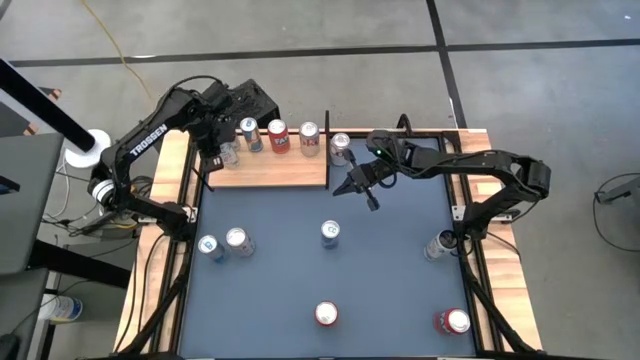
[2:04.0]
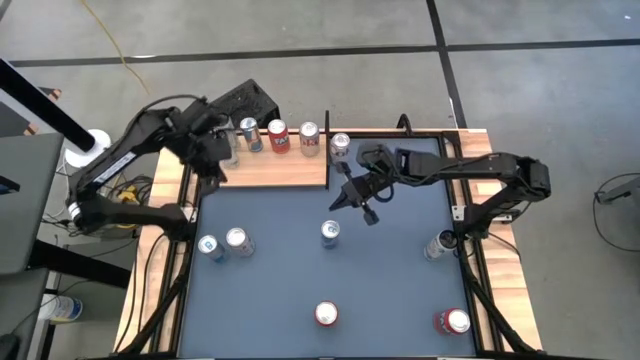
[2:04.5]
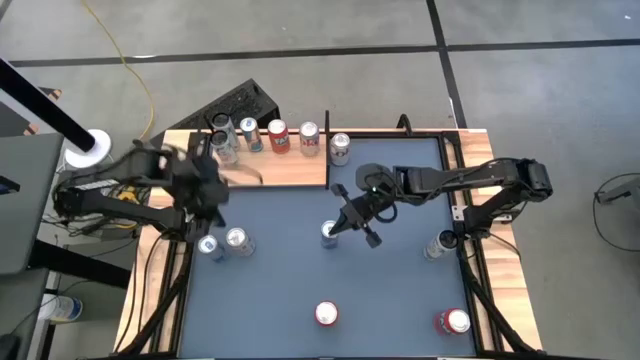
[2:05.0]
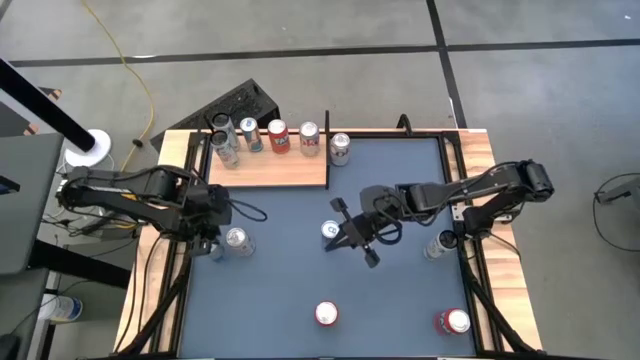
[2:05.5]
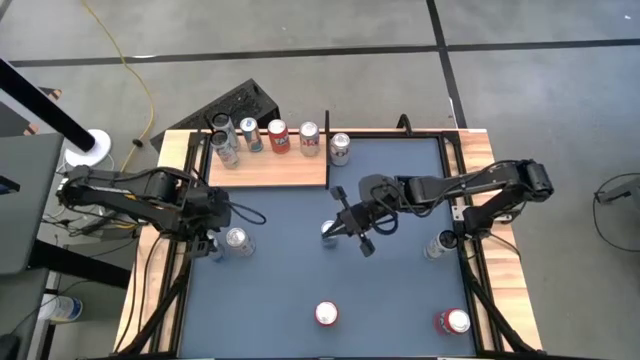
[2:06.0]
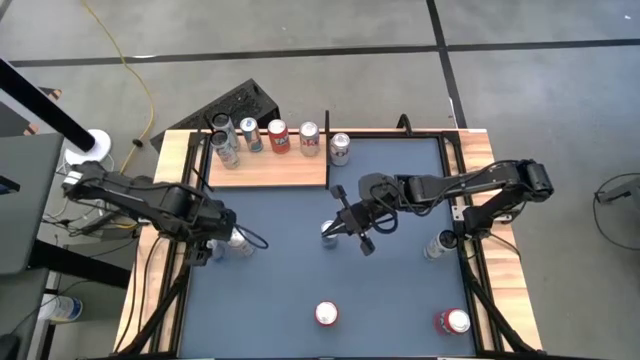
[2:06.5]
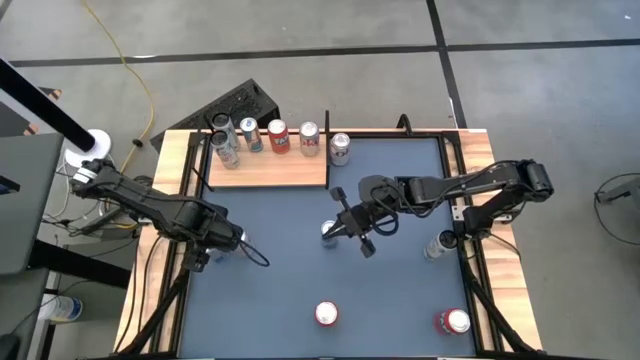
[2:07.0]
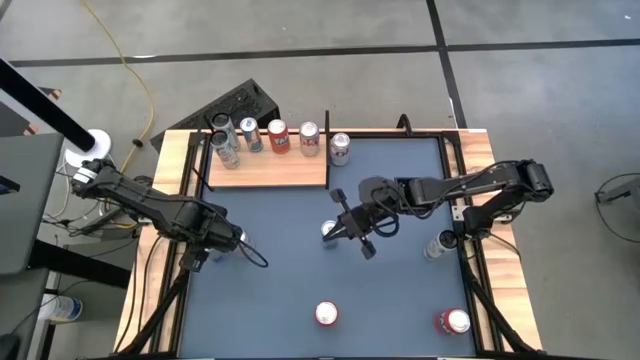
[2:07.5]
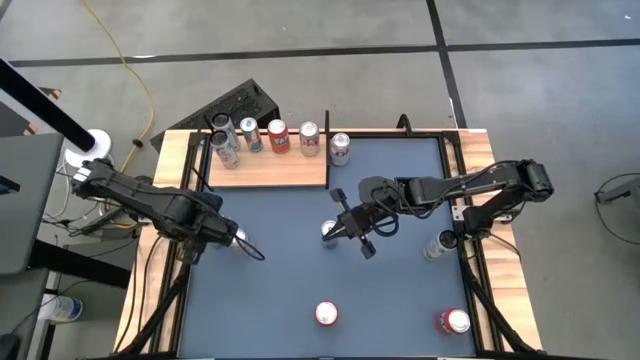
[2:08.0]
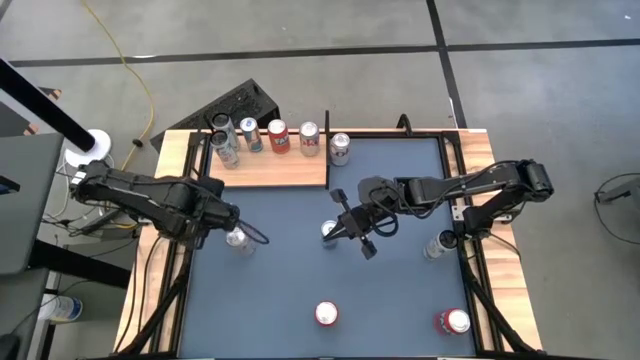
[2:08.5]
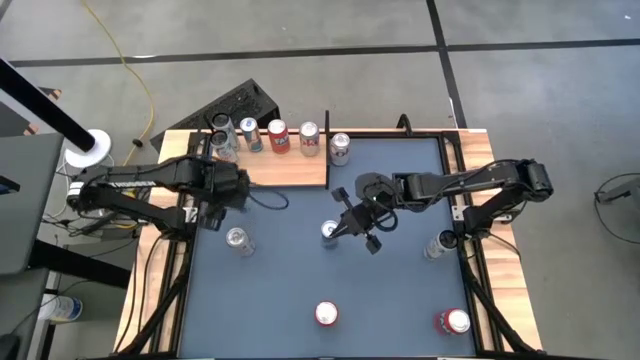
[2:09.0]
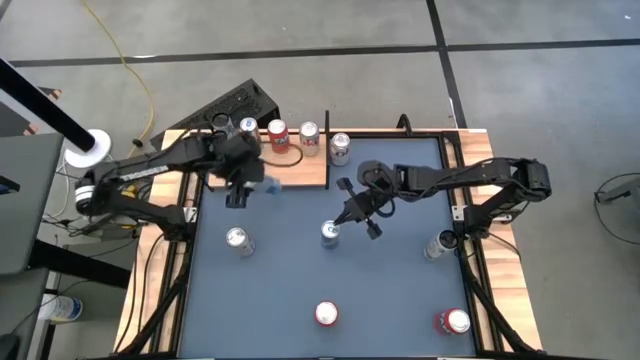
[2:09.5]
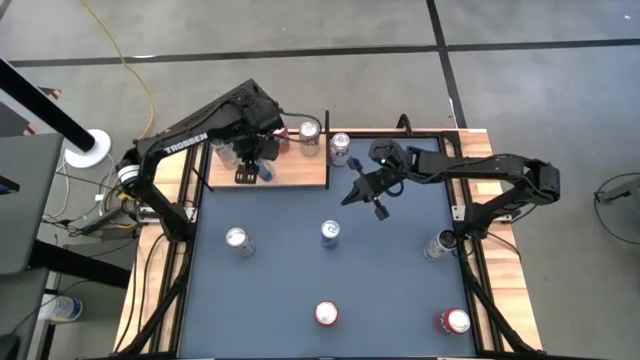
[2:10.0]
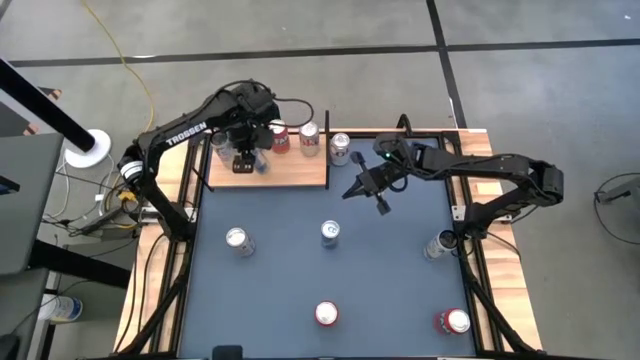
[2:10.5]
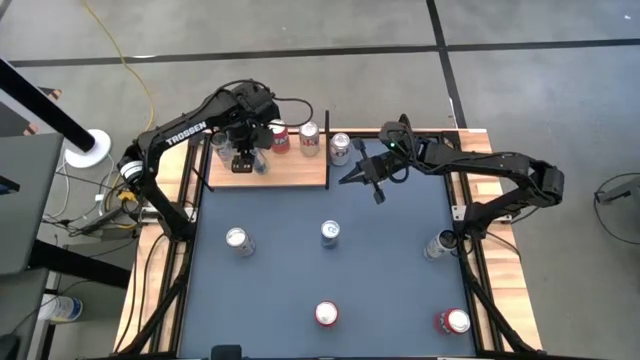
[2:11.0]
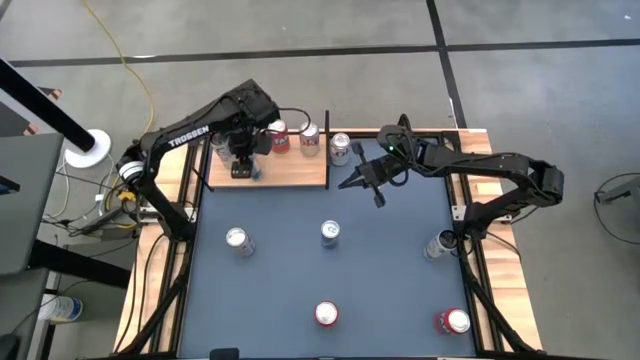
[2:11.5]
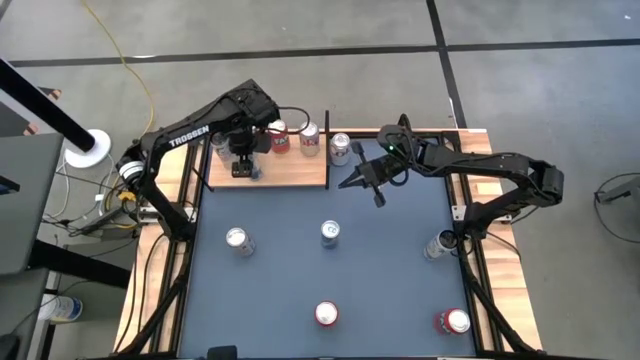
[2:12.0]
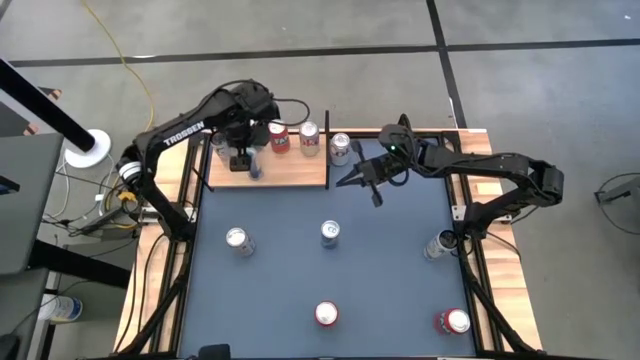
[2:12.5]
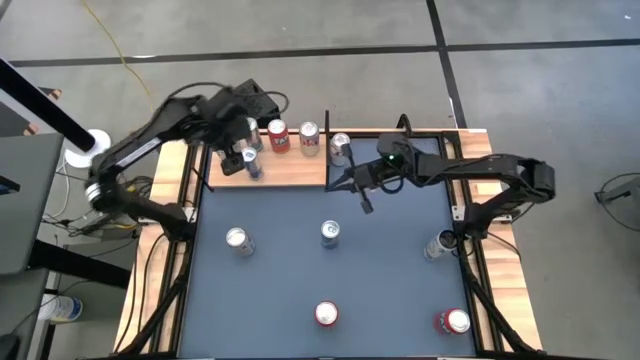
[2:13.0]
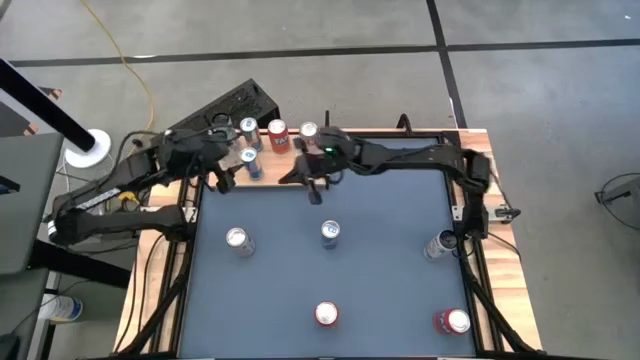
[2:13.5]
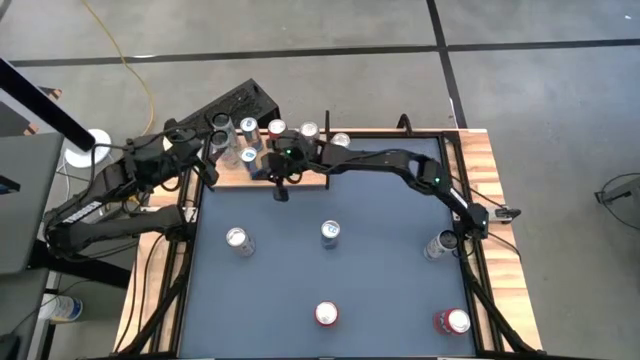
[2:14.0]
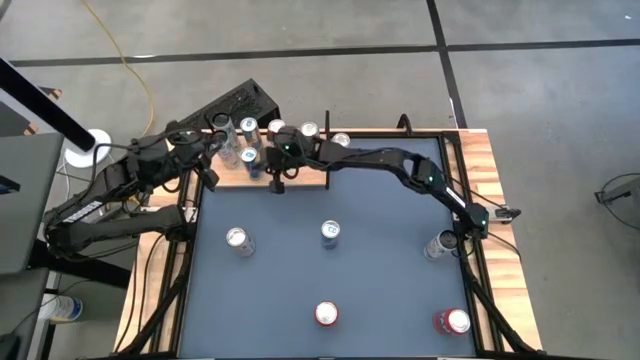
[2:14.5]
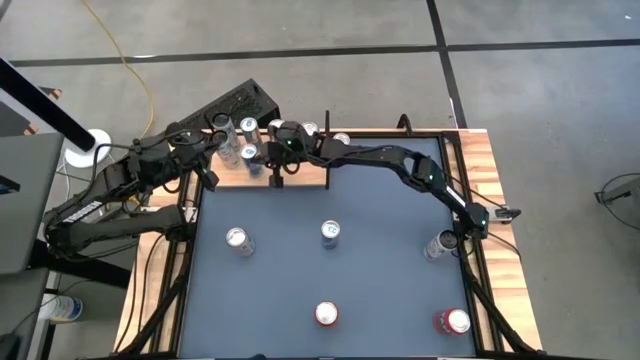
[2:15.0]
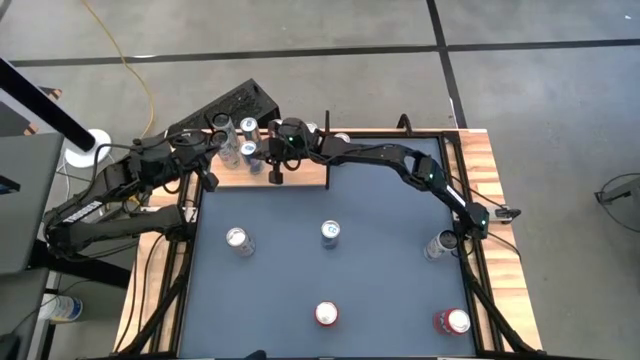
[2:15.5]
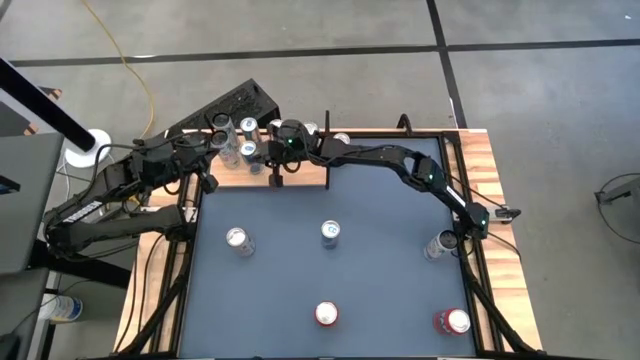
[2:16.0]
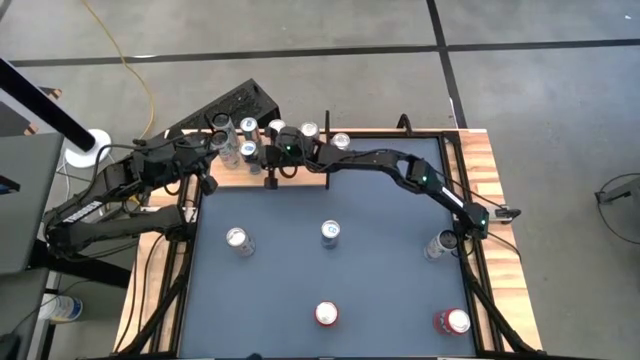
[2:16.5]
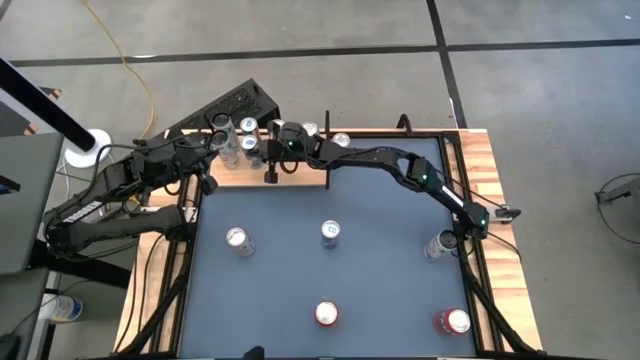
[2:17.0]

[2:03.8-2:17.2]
Task: Place canned beverage on shelf
Put the left blue soda can on the shelf aligned with the other blue soda can

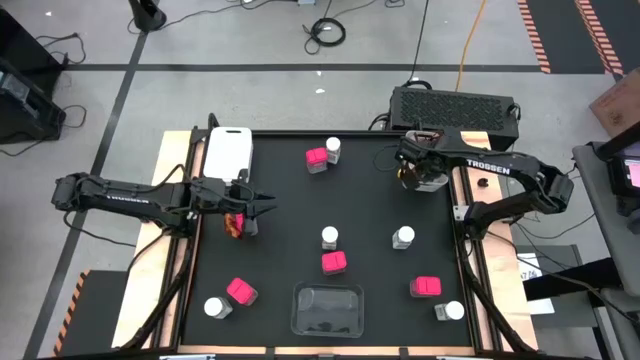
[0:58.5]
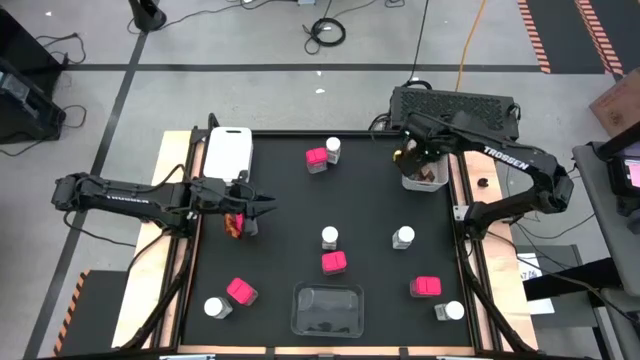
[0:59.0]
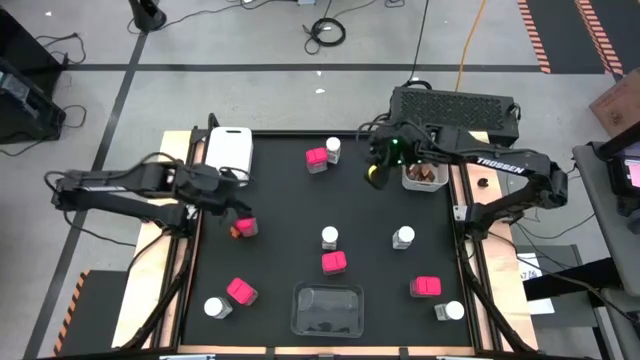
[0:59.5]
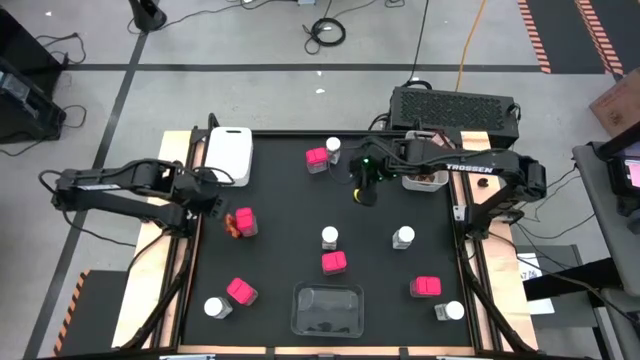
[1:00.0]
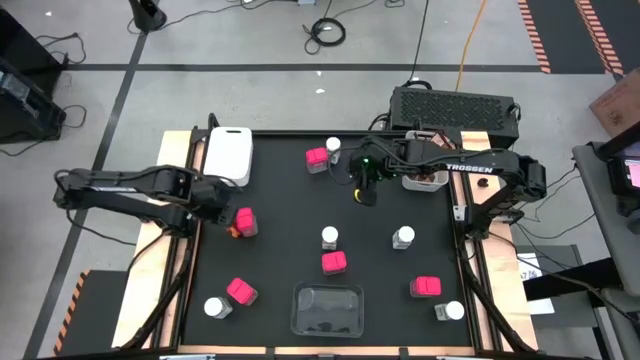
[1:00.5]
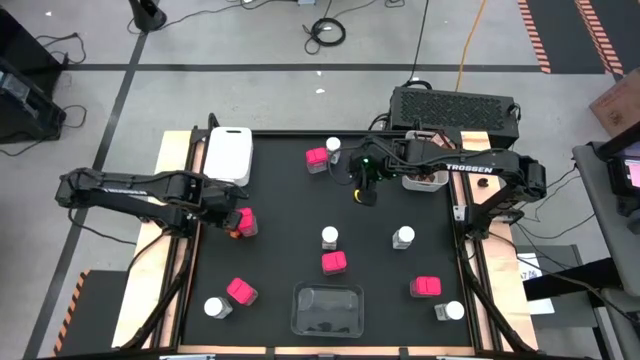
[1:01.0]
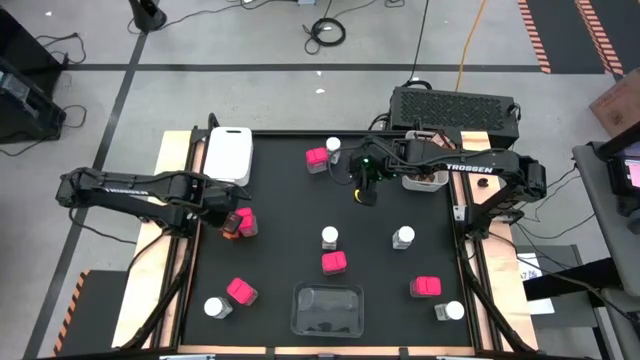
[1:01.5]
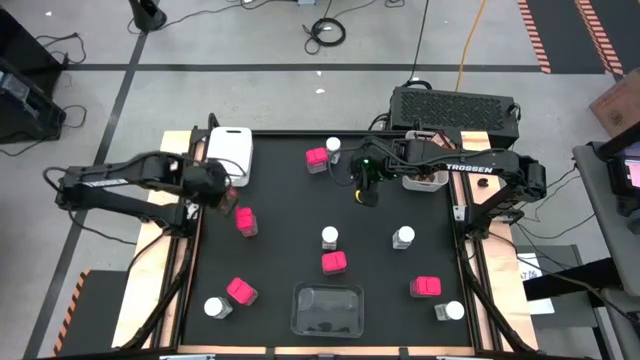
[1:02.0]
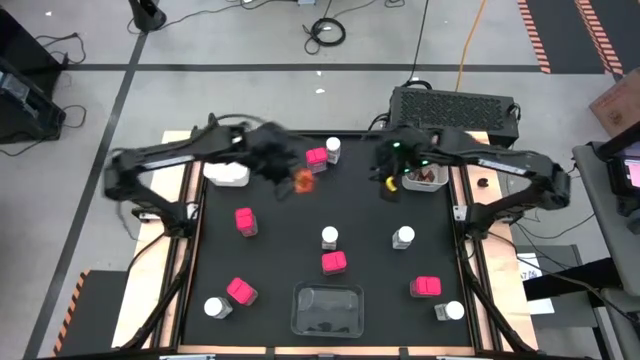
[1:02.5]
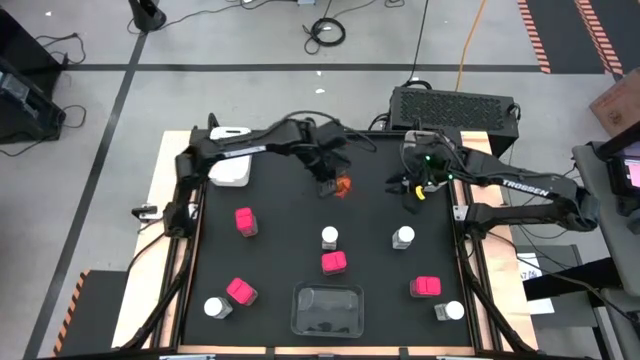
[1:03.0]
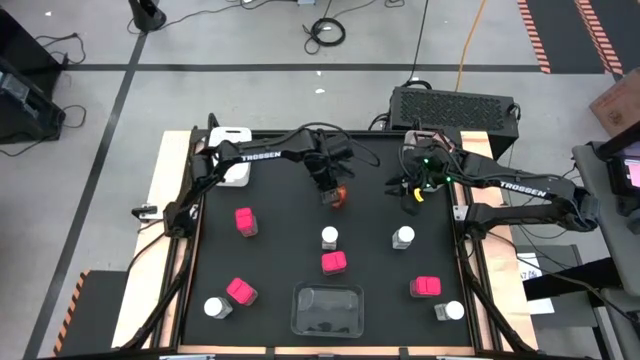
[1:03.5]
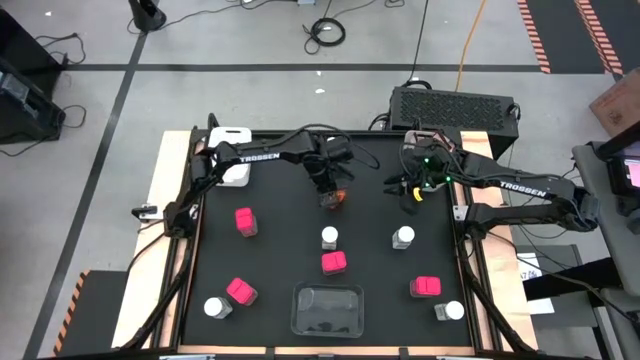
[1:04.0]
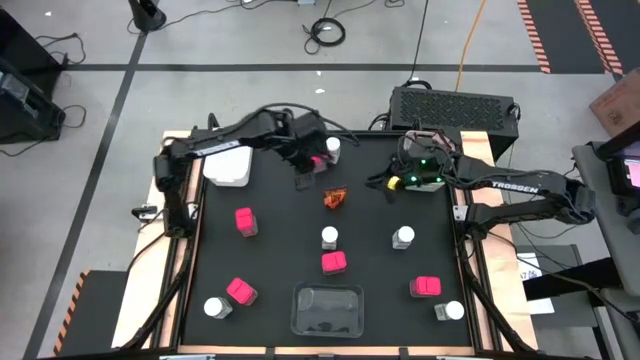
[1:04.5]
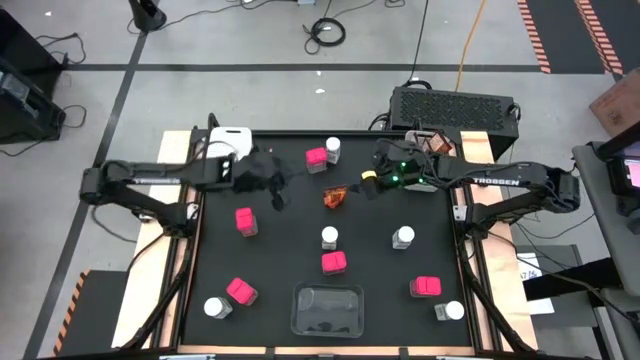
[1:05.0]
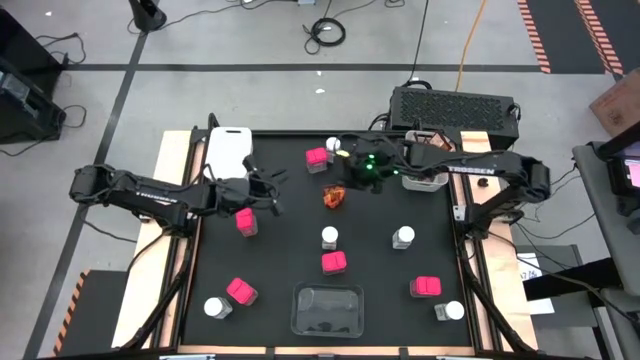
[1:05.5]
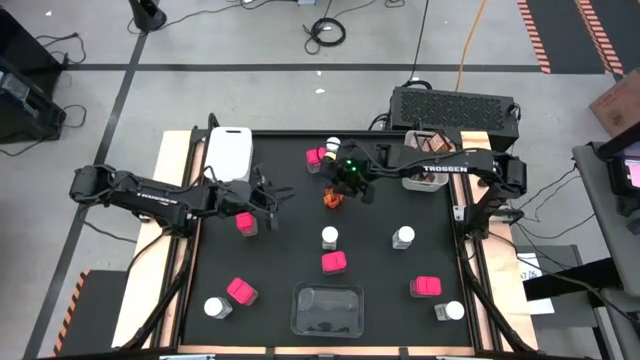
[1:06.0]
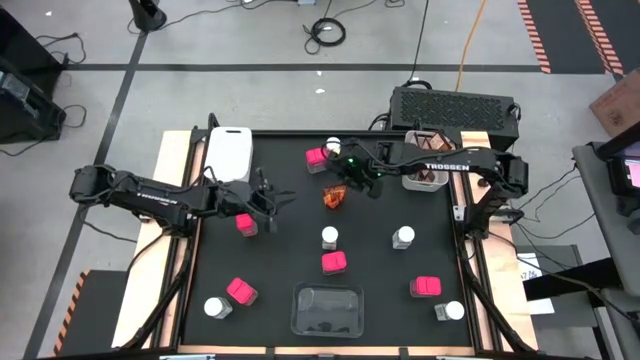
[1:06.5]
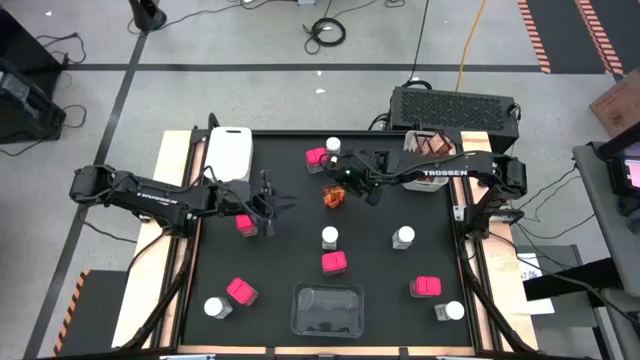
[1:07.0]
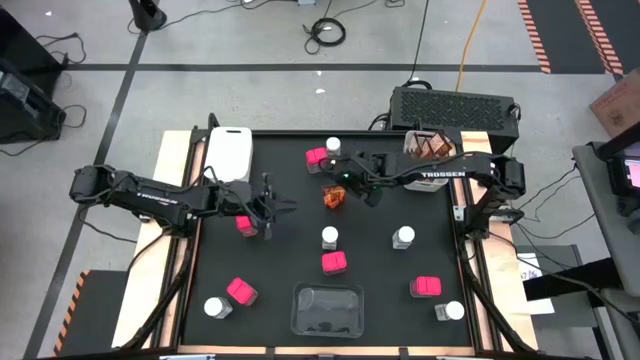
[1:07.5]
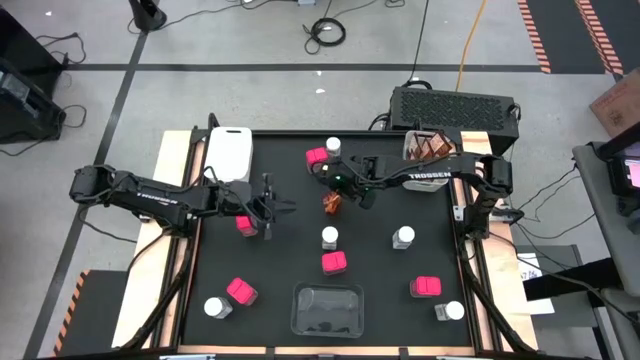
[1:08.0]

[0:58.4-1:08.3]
Task: Sort spices by type
Put the brown seasoning pack into the right white bin
